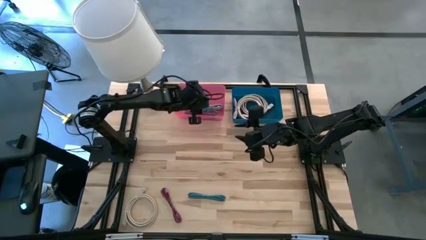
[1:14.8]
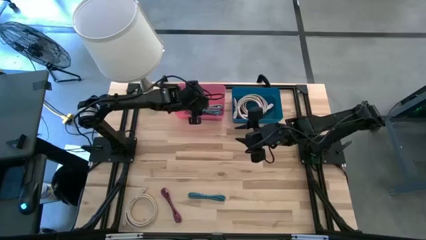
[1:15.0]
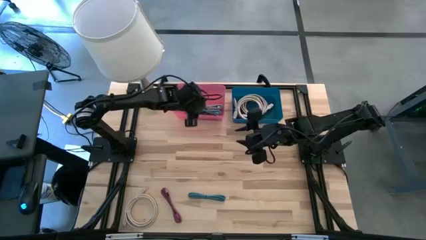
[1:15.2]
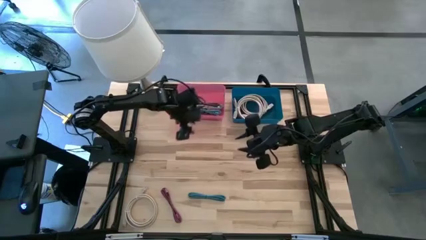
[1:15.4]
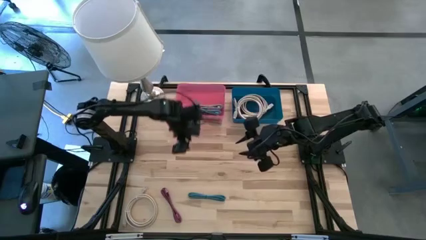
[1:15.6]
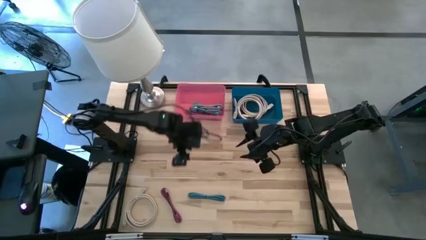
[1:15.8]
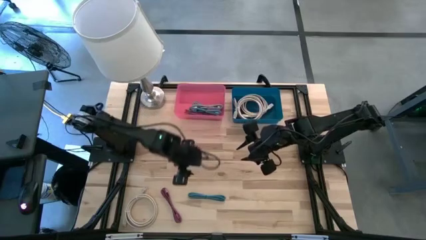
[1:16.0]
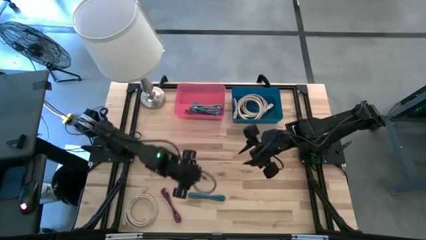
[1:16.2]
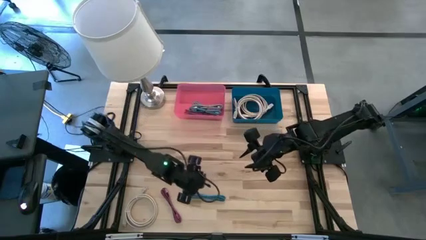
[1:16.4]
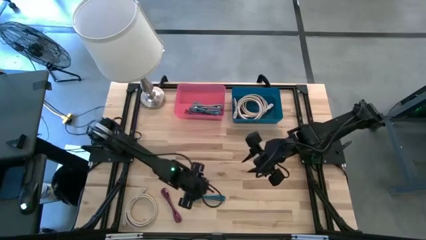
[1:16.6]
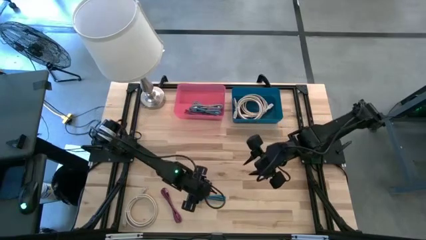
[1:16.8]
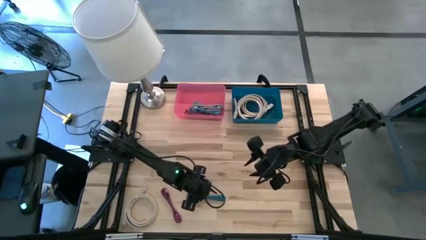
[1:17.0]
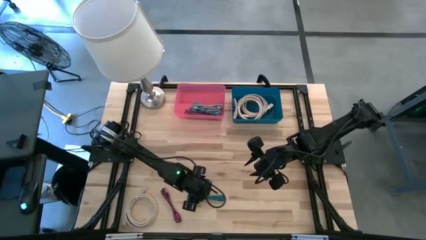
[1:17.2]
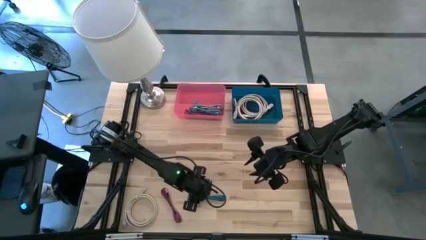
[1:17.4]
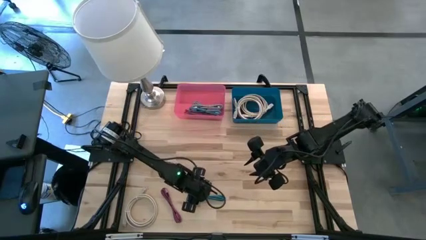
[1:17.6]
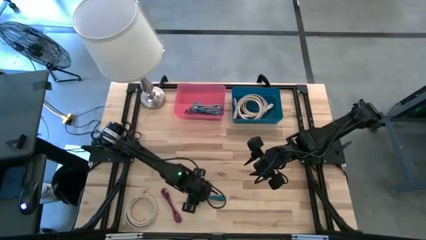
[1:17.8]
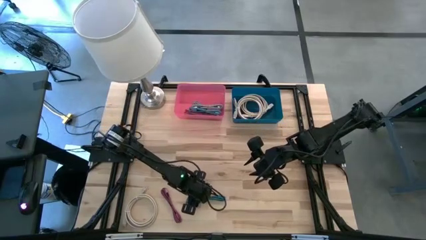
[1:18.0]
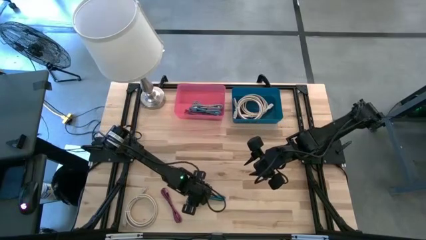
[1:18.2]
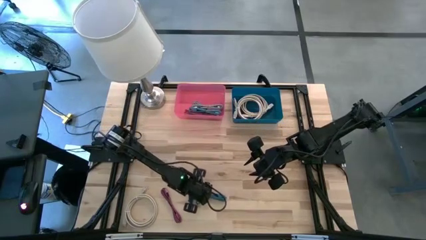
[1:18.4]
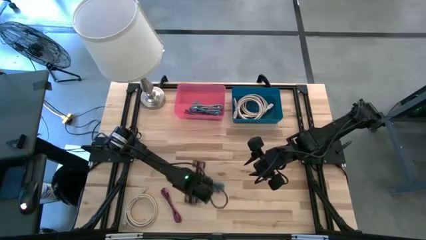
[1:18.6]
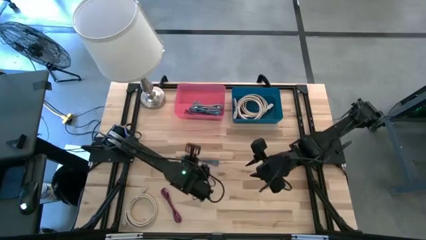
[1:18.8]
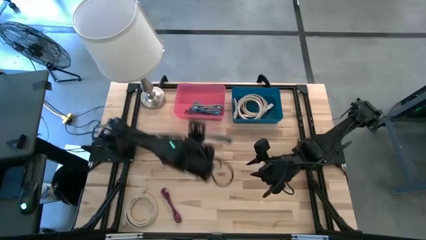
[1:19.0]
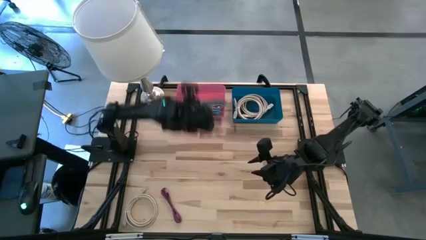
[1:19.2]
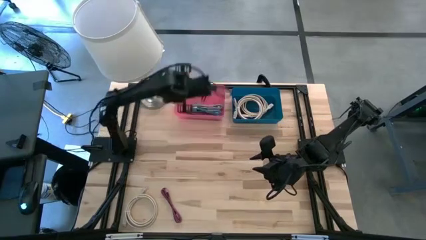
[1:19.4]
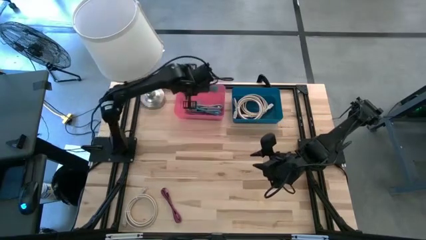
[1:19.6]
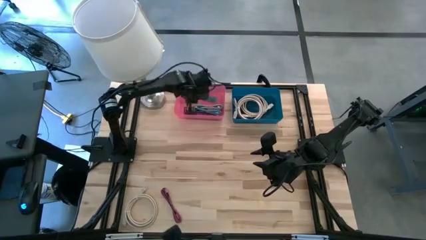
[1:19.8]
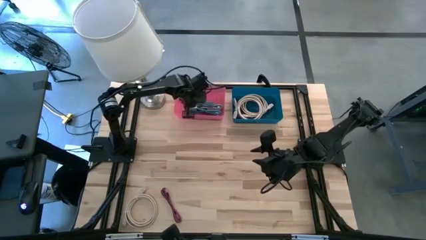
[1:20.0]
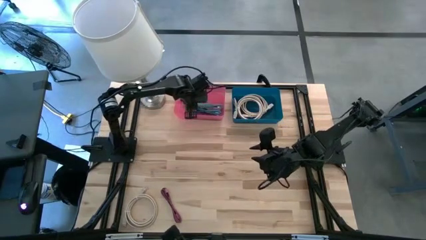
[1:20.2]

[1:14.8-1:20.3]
Task: Pick & Place USB Port
Put the black and blue charger cable into the red bin

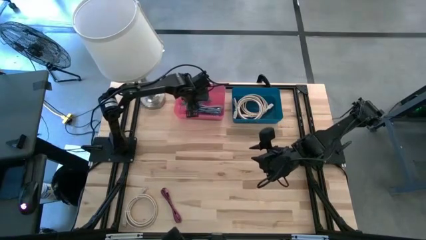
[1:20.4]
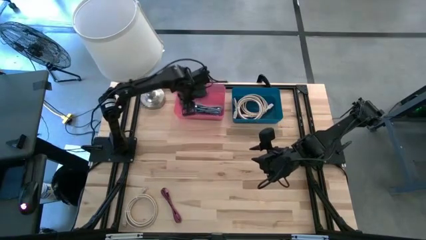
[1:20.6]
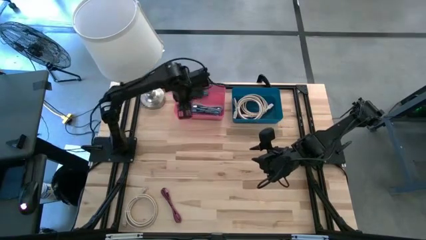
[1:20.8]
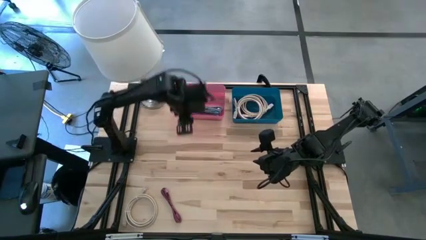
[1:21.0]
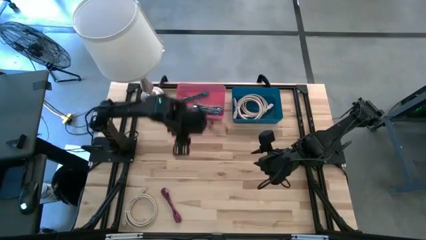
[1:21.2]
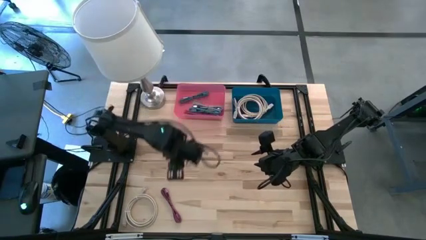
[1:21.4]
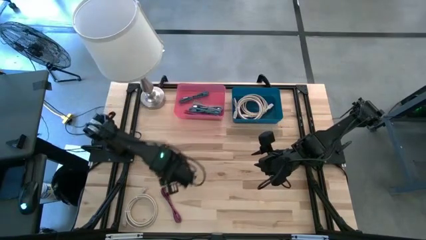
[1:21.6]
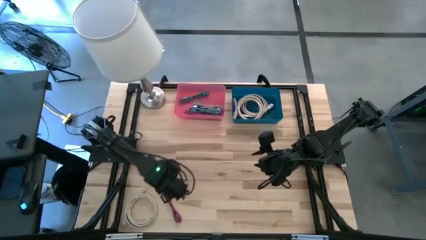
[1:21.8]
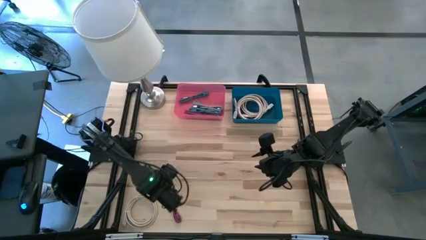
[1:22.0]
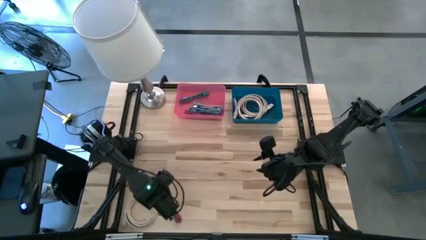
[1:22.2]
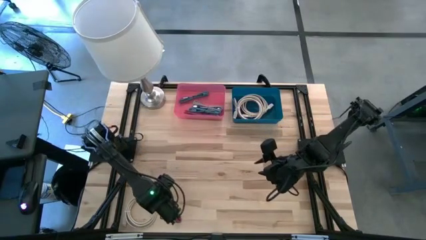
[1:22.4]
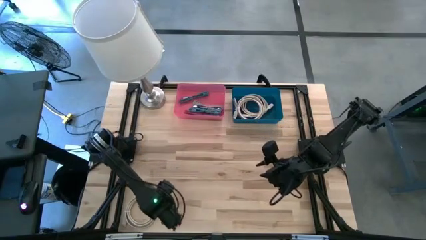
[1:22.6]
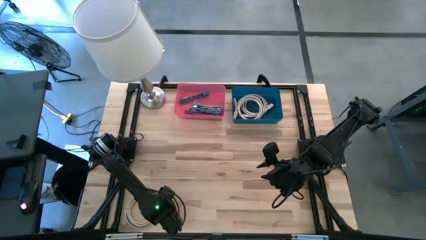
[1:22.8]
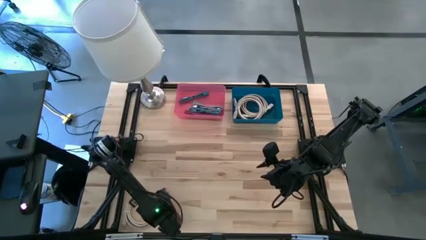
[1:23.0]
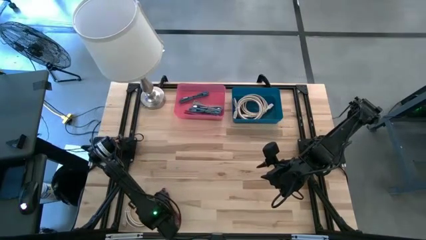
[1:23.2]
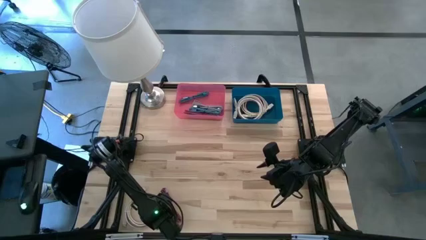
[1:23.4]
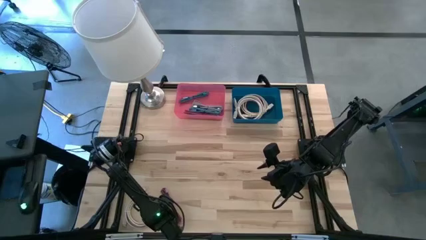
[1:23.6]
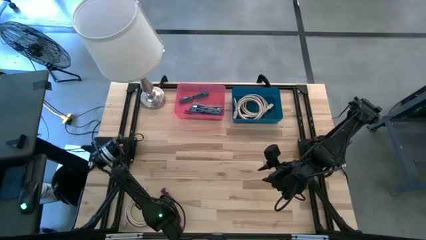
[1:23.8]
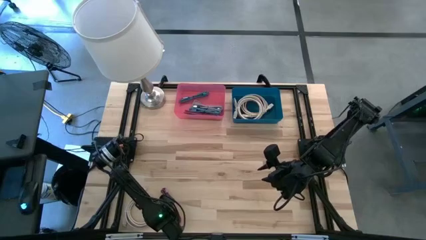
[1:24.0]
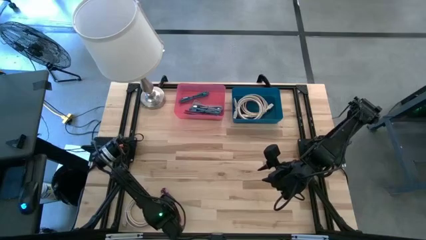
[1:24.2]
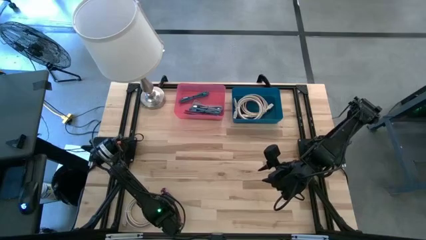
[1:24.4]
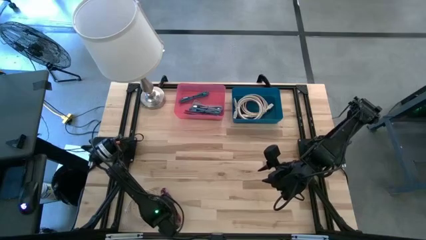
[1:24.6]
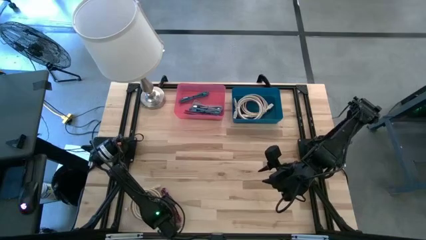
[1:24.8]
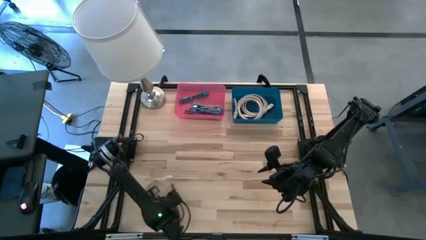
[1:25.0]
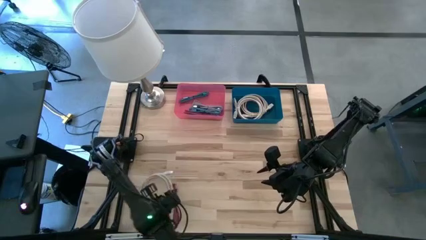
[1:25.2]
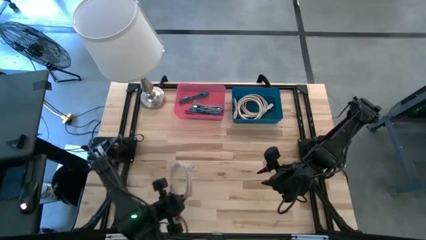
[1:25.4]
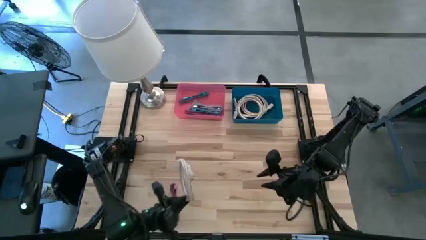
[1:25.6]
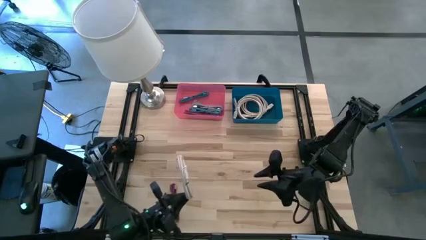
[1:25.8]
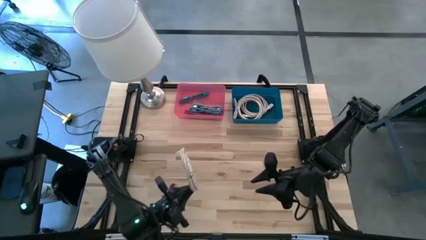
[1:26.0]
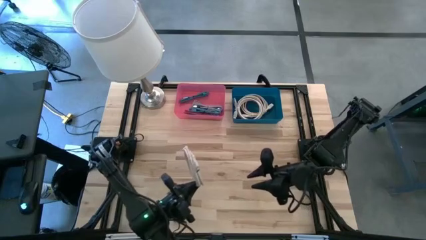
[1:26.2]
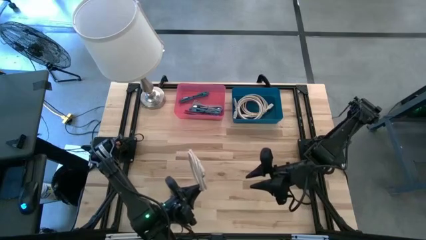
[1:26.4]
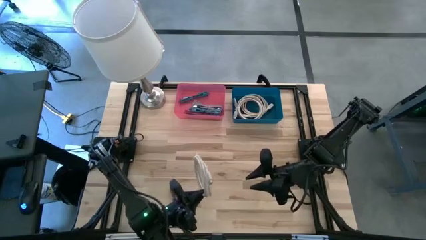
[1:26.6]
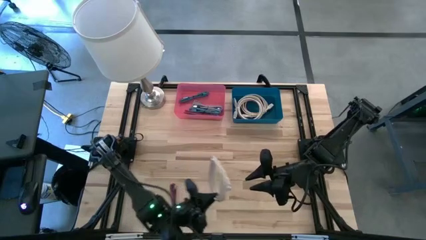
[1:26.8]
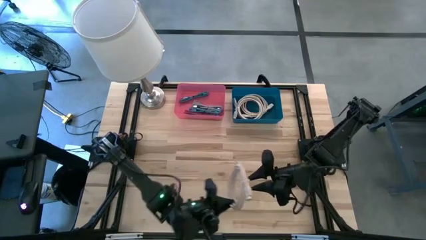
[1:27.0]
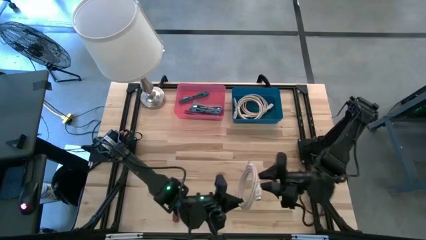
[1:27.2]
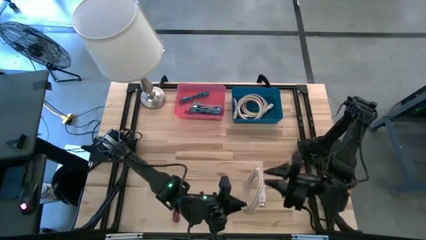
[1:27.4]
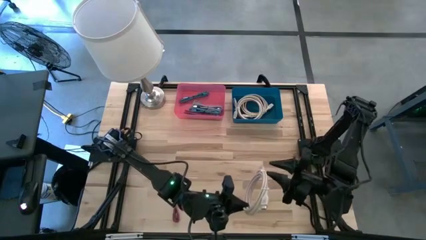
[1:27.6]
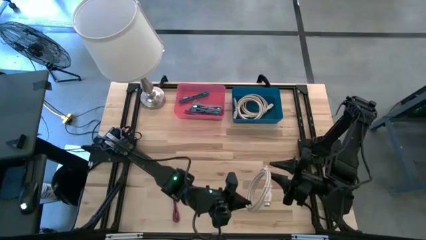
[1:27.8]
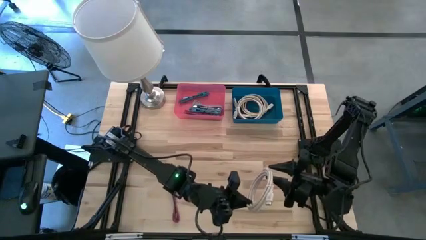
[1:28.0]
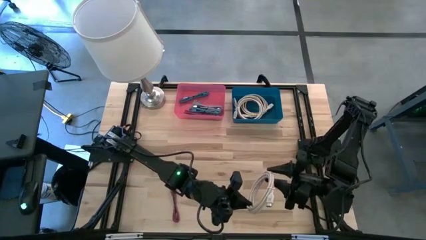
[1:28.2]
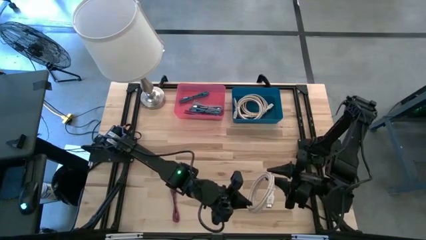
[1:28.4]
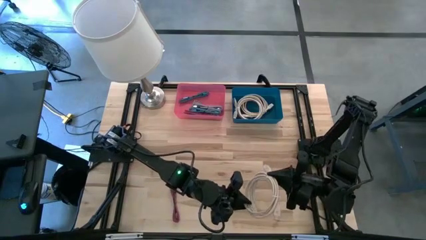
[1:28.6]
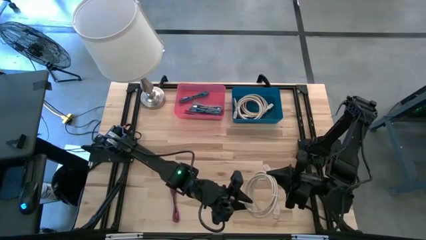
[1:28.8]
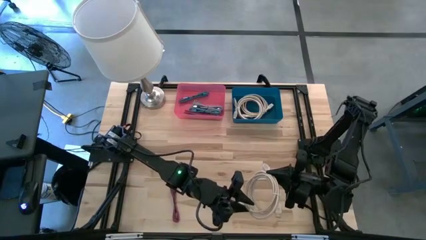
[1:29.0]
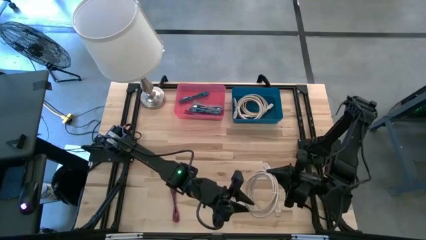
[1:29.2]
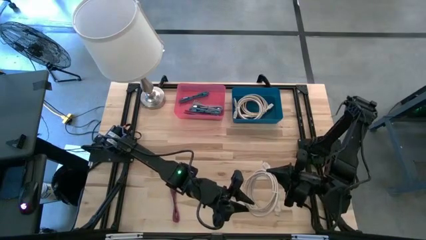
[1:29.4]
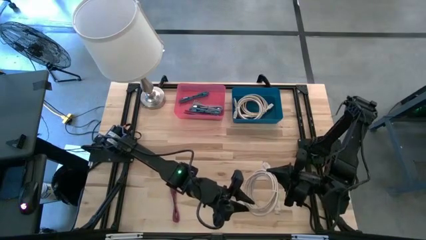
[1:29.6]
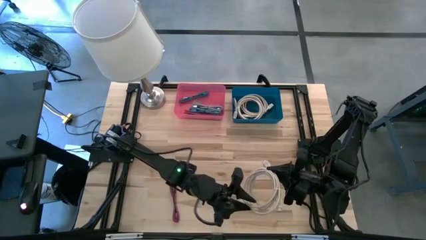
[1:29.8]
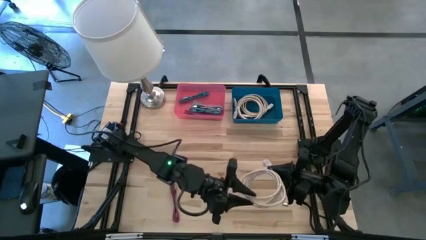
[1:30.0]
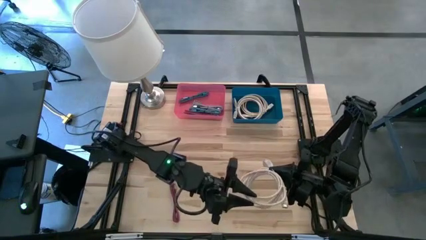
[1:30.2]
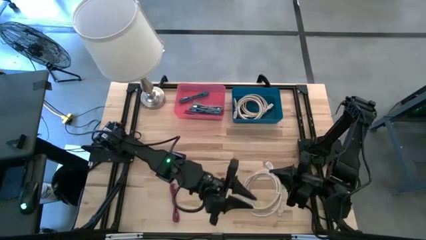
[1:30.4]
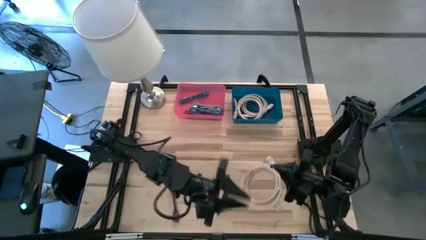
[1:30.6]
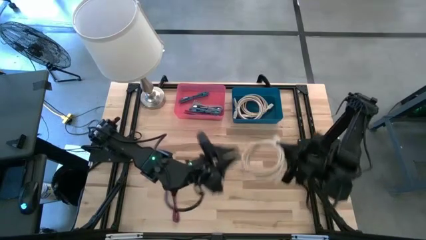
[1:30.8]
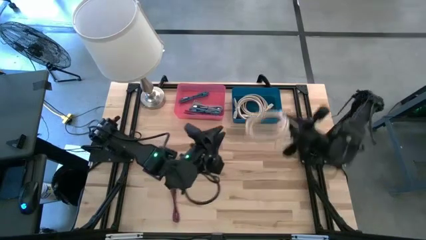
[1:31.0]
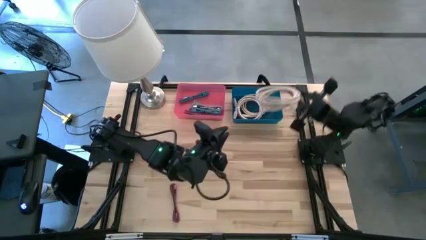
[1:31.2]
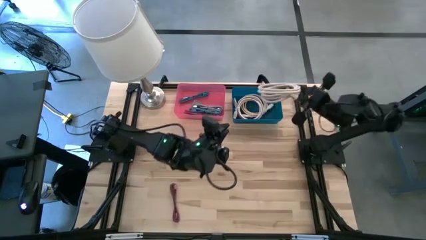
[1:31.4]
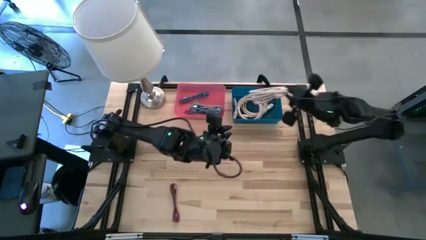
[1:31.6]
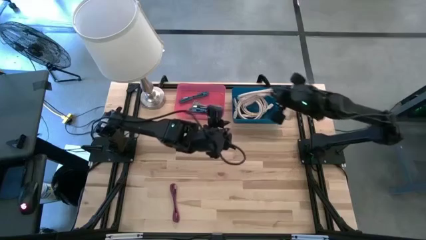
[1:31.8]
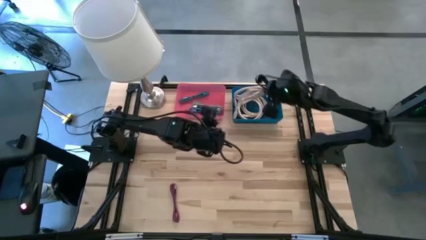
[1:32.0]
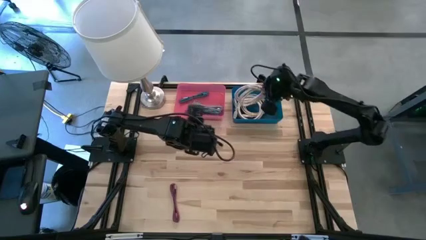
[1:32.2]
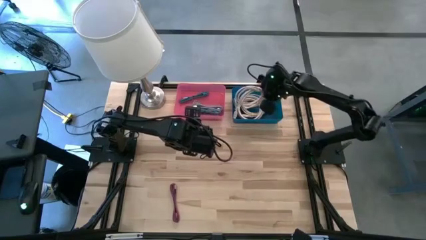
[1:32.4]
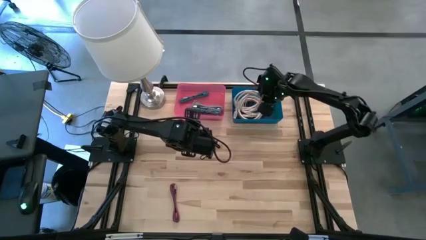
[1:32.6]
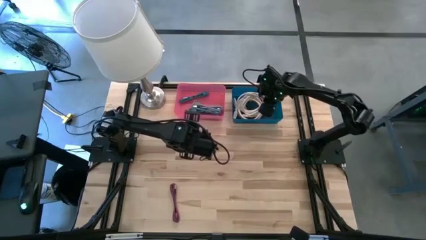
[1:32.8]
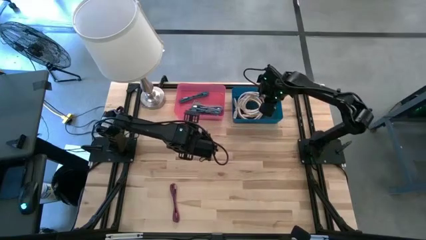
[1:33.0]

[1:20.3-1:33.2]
Put the brown HDMI cable into the blue bin
